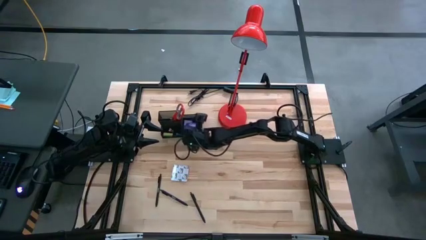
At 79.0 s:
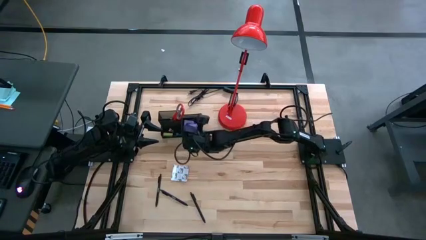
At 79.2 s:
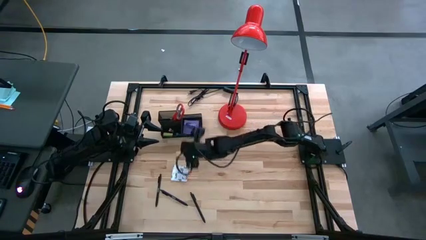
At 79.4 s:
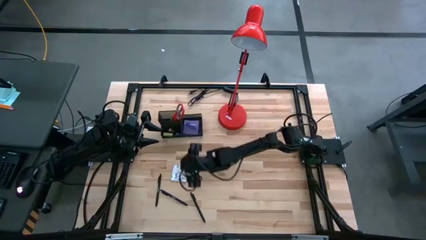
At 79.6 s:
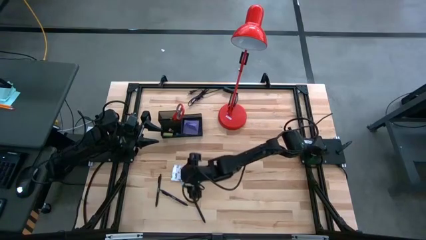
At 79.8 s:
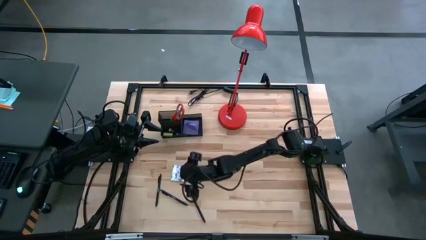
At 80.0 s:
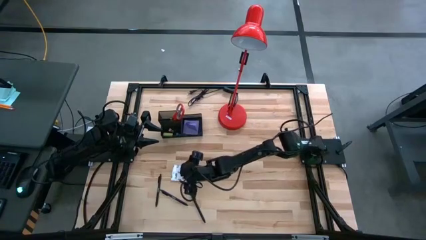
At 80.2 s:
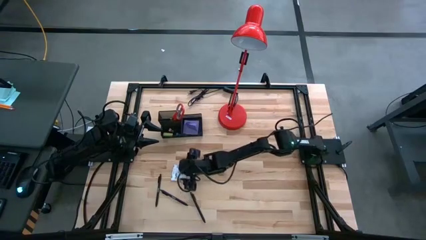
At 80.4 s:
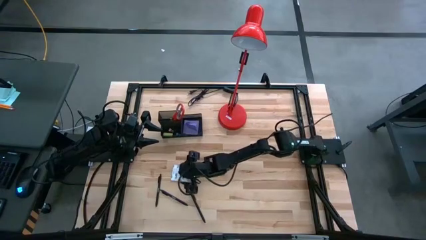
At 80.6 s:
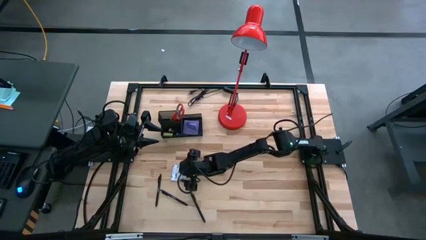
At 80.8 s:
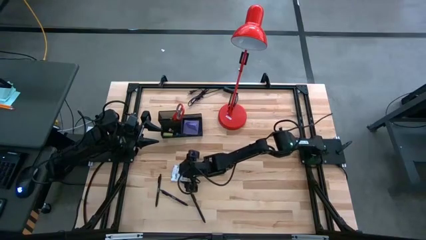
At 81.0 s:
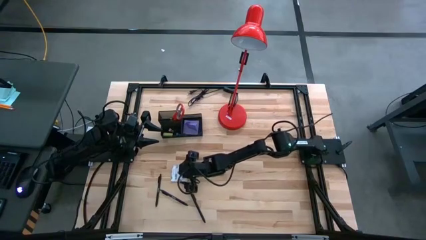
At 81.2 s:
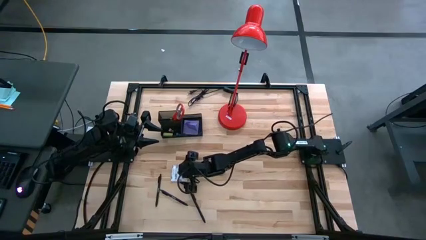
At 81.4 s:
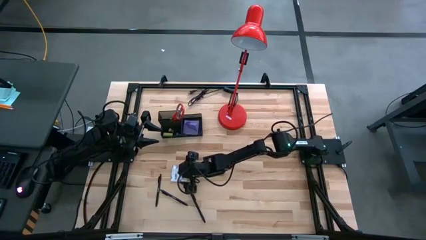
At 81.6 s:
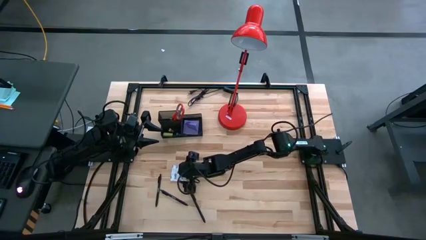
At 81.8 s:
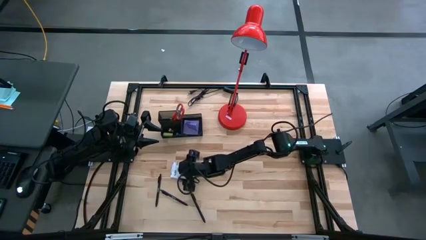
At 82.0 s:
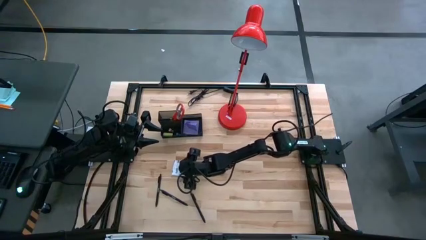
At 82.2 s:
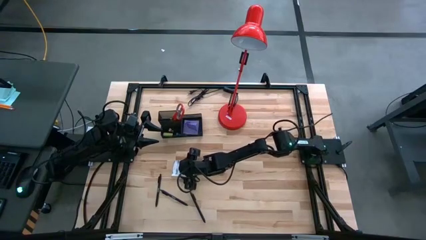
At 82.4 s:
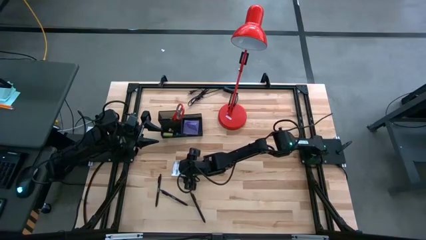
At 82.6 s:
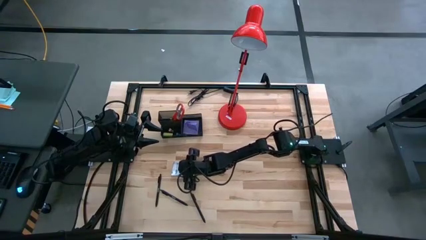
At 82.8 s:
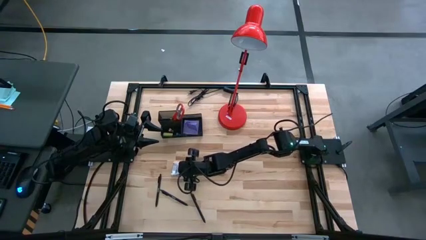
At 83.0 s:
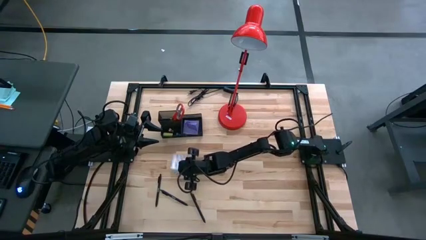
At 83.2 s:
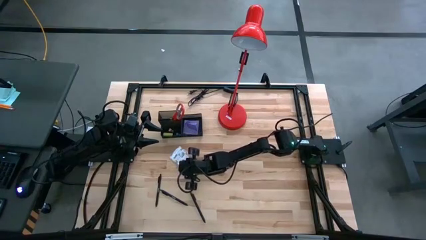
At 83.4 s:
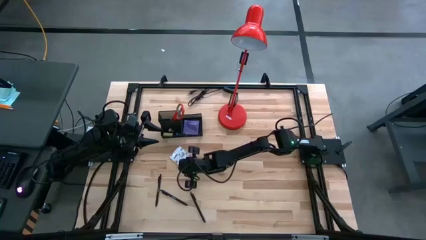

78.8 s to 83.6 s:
Task: Pick and place office supplies into organizer
Put the white sticky notes into the black desk organizer

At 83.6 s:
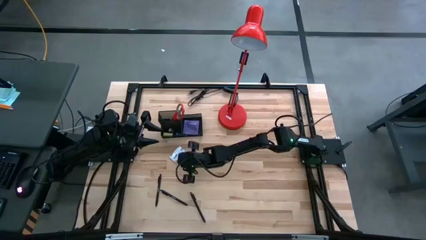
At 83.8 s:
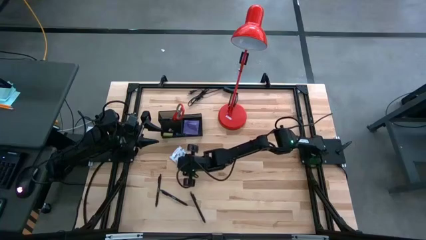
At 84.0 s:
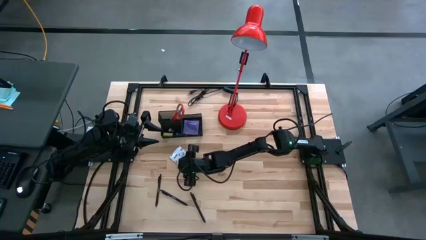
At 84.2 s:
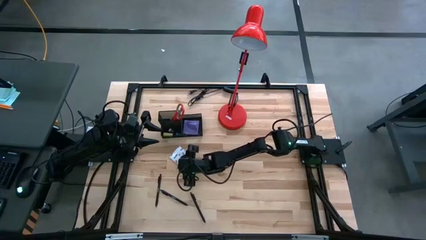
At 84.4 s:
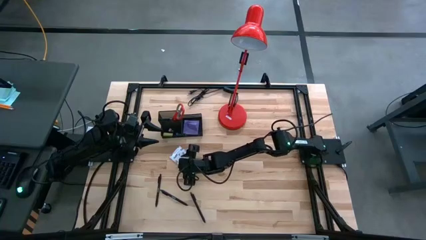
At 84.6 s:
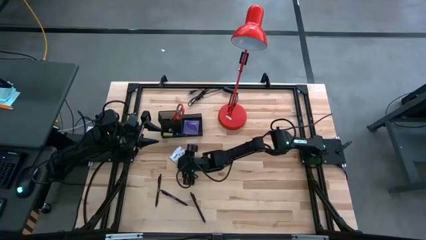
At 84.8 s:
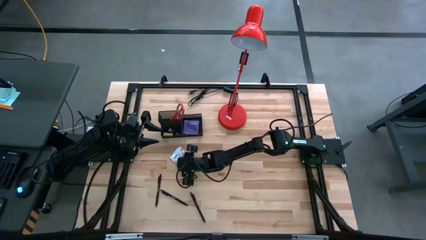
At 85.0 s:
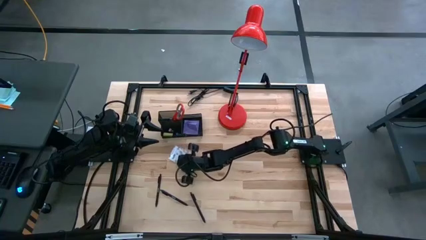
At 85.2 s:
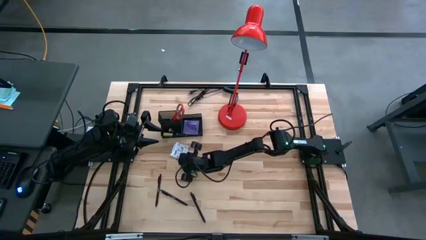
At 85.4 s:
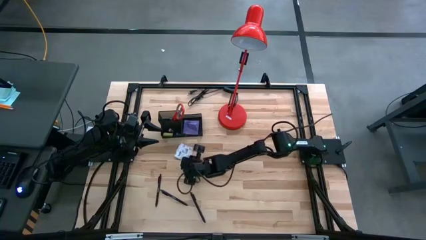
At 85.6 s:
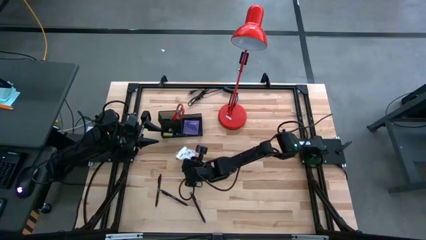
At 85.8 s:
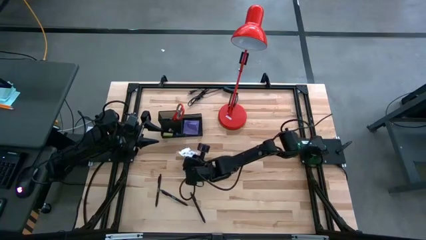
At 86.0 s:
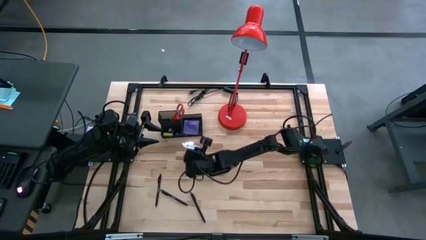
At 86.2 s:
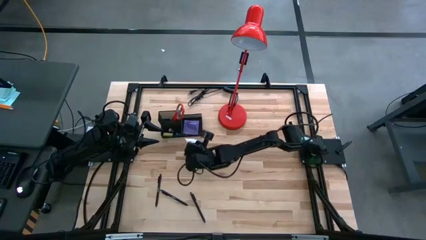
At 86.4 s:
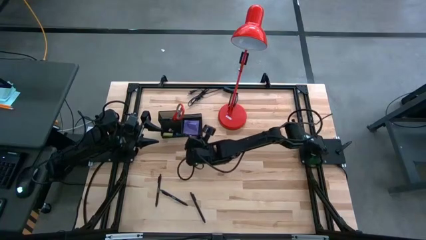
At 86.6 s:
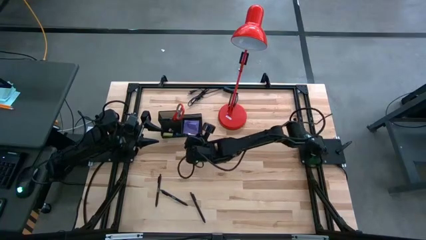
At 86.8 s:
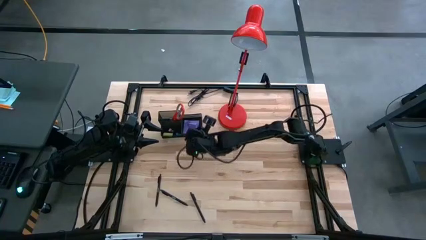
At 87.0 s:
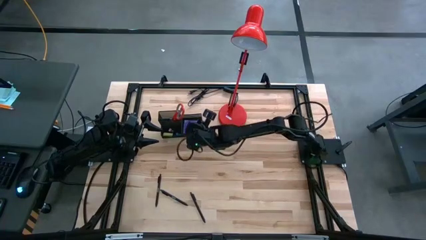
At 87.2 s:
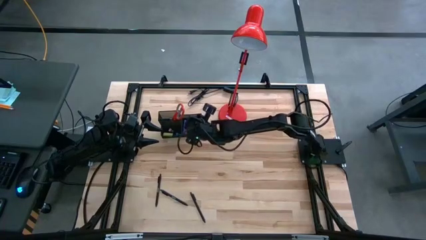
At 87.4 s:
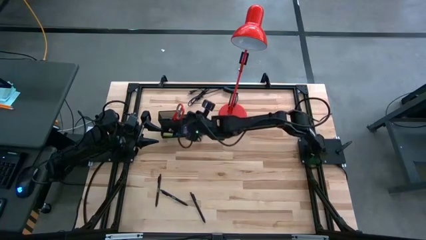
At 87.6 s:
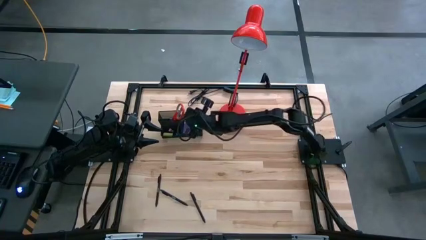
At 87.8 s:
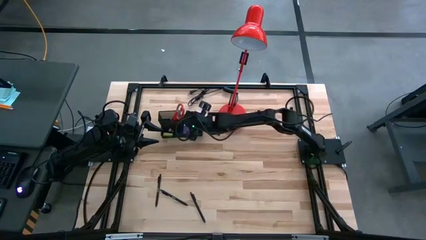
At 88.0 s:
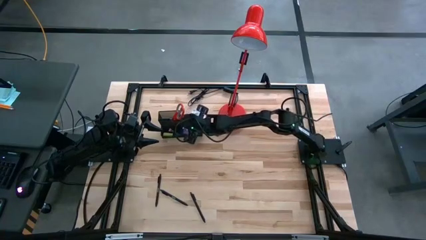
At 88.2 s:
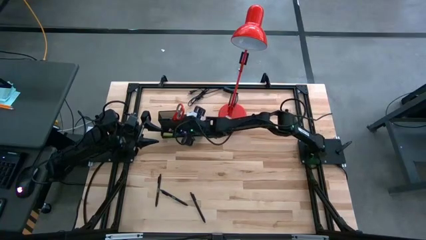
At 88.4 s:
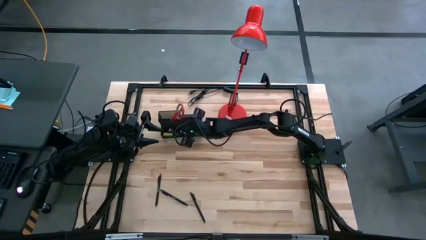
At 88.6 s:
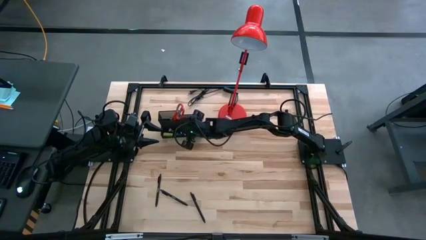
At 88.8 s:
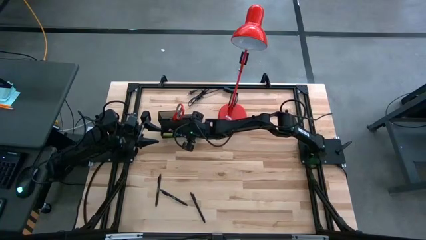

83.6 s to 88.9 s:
Put the white sticky notes into the black desk organizer

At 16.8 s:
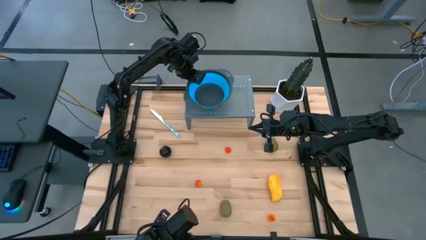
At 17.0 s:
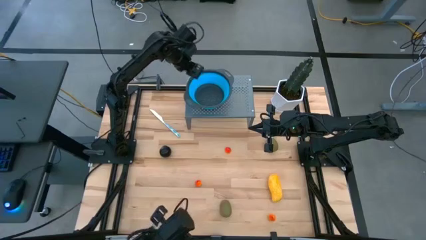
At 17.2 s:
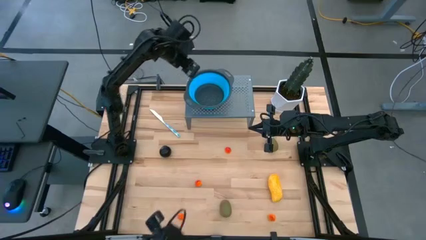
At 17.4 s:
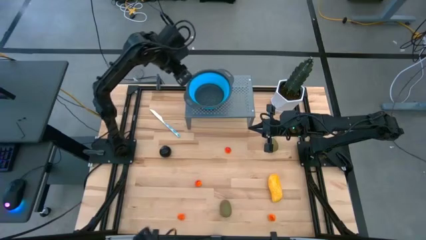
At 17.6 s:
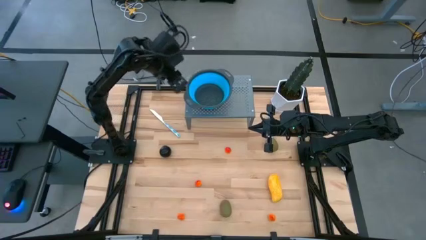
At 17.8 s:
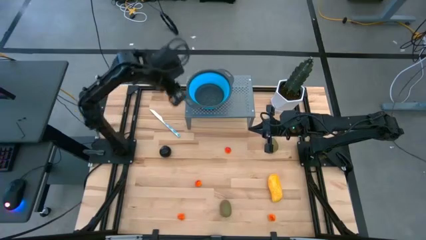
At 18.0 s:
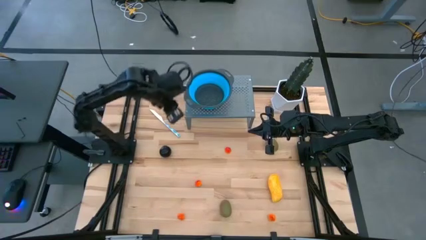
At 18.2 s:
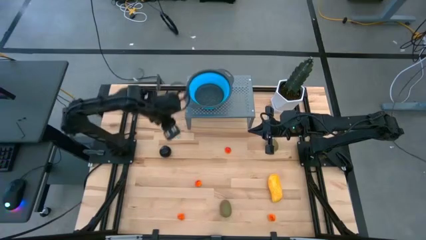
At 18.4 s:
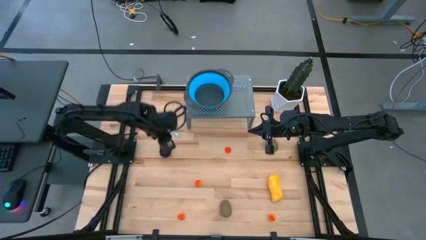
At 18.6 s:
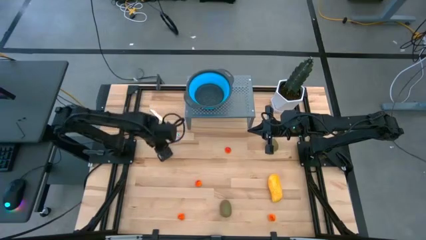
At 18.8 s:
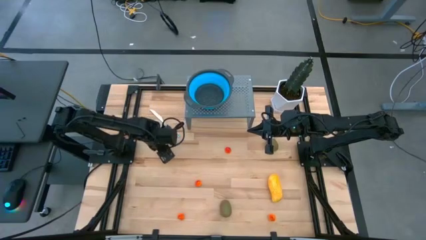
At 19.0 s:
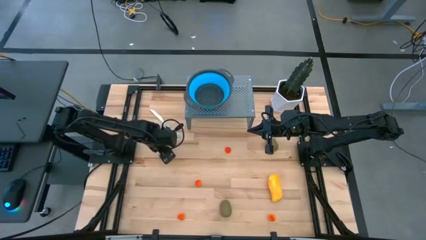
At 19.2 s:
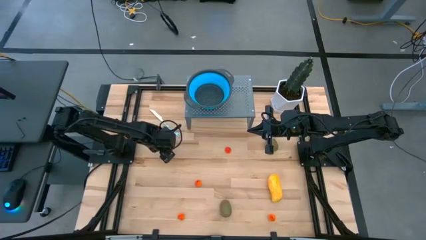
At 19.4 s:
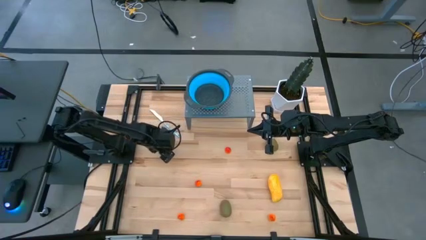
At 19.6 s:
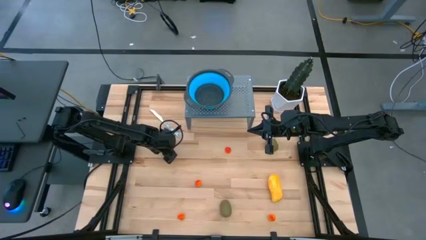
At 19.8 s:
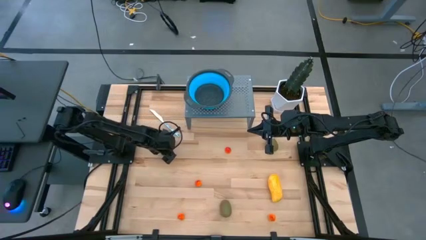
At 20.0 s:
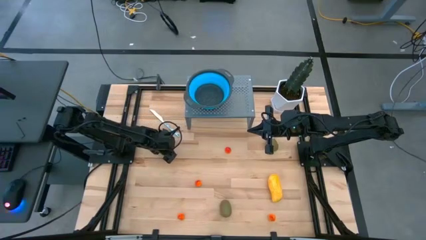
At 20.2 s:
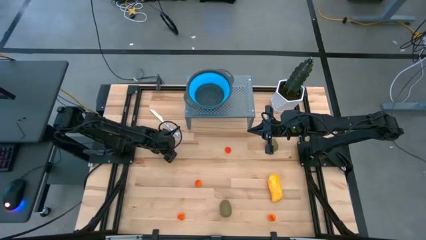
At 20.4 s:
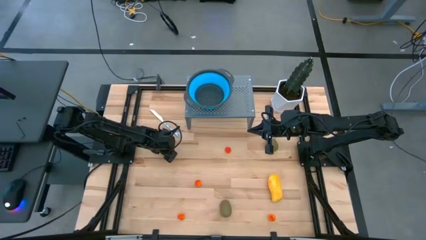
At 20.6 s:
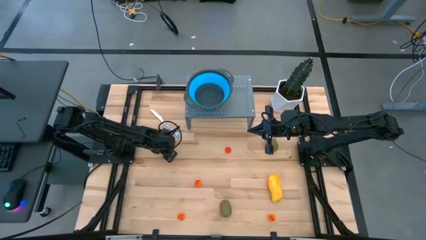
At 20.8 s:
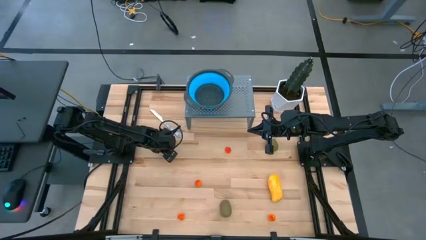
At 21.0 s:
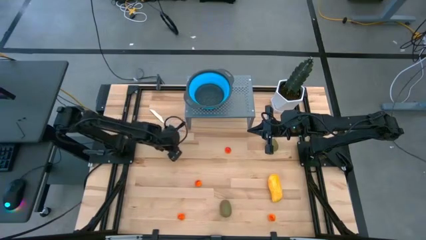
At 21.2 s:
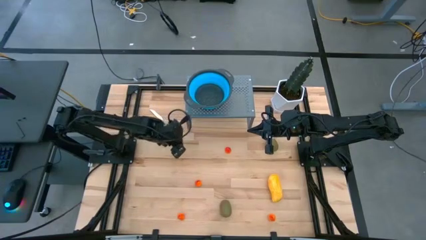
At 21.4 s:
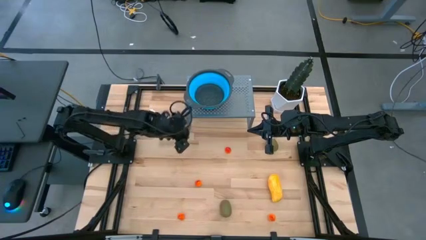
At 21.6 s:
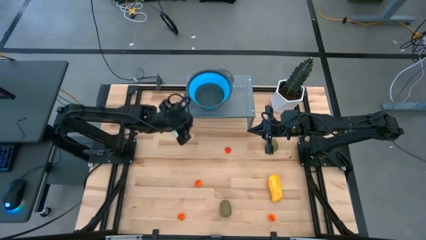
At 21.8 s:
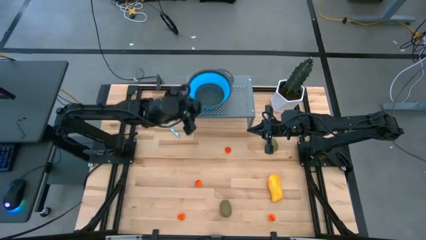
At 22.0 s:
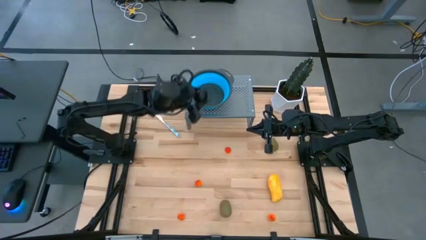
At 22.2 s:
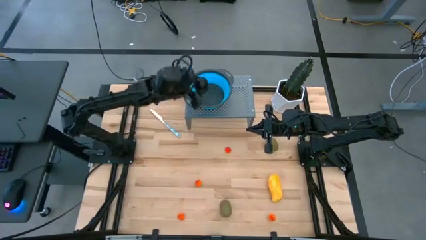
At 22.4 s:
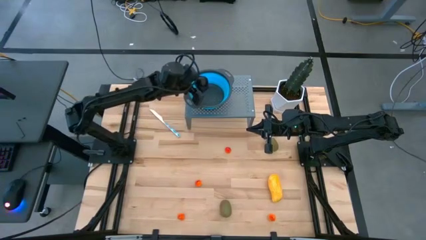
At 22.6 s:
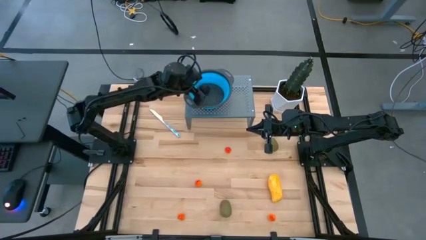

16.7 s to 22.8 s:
Task: Pick & Place Fruit
Put the black plum into the blue strainer bowl
